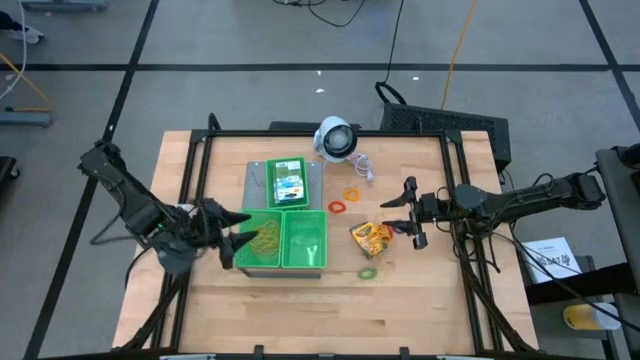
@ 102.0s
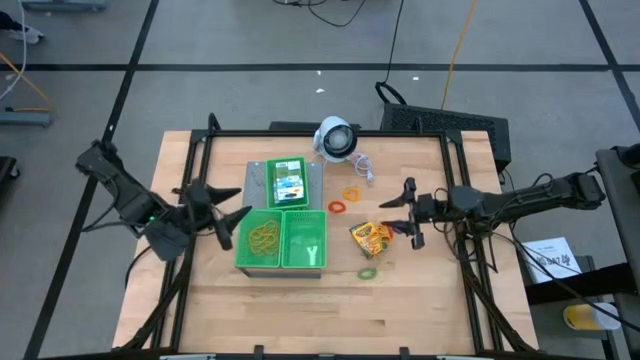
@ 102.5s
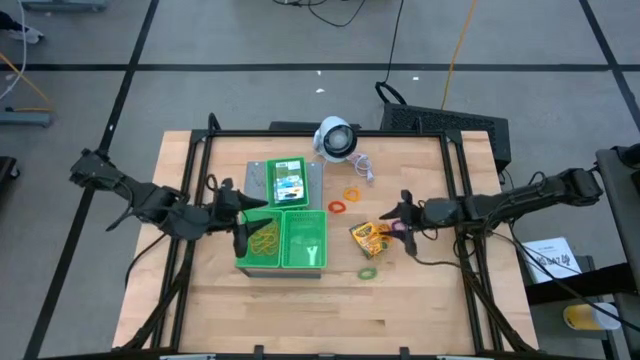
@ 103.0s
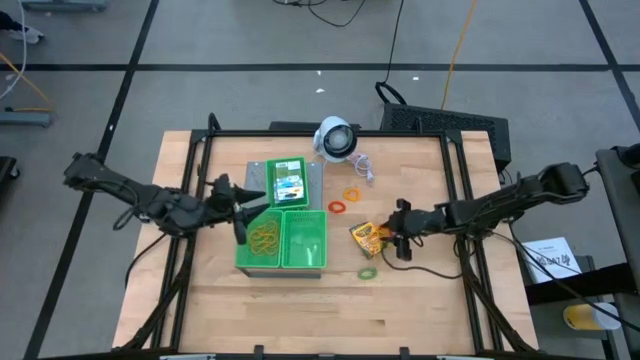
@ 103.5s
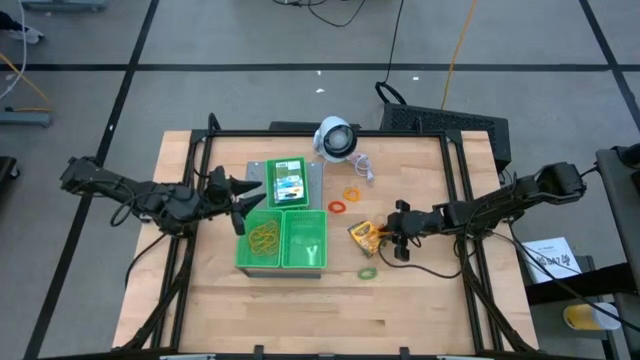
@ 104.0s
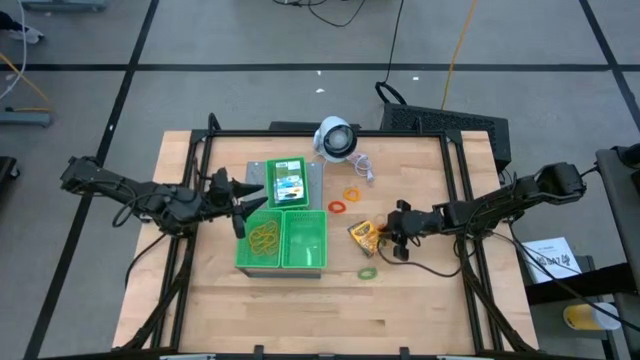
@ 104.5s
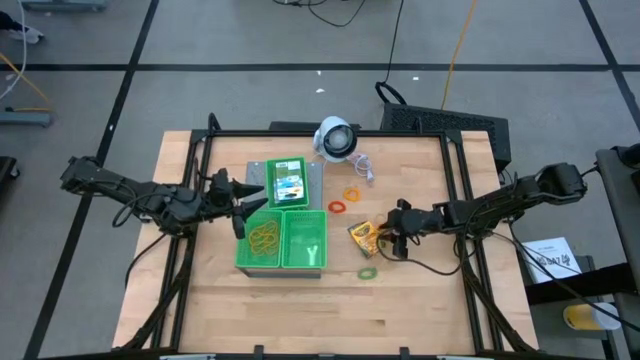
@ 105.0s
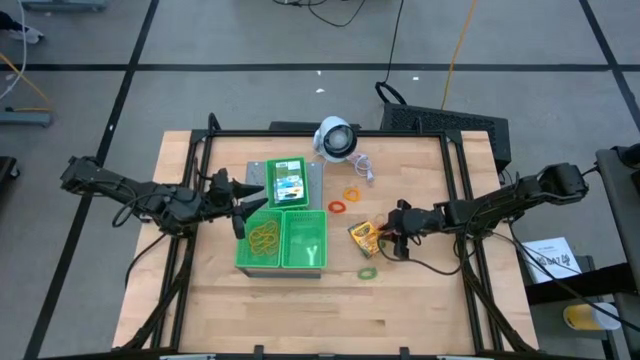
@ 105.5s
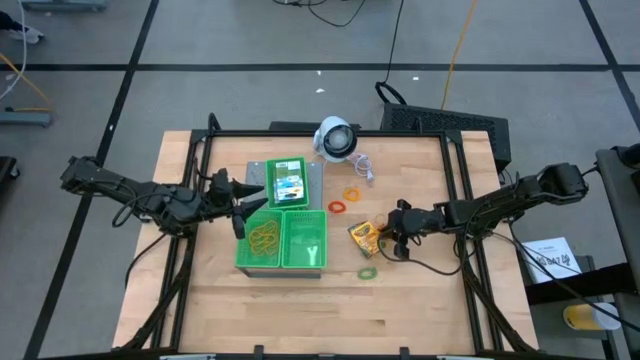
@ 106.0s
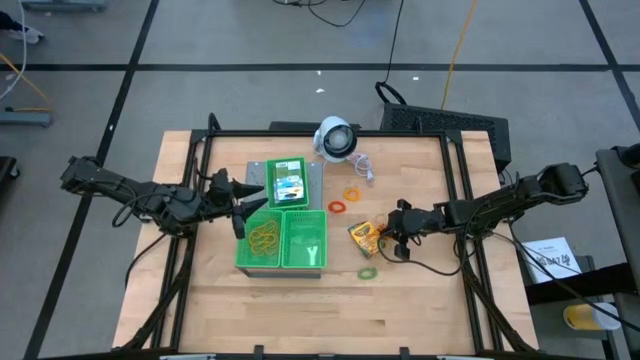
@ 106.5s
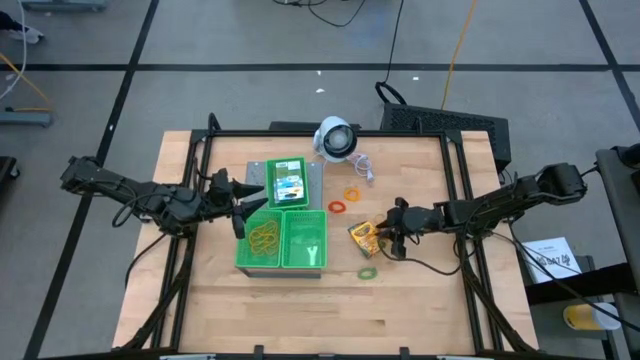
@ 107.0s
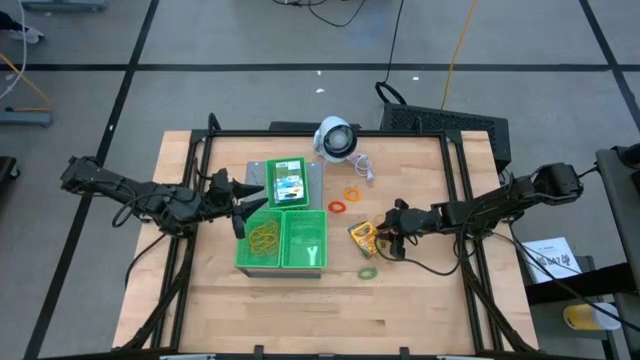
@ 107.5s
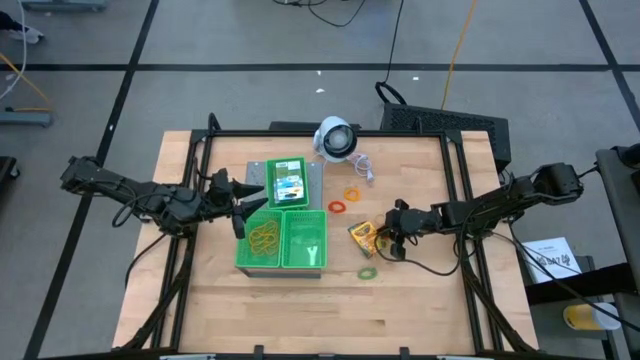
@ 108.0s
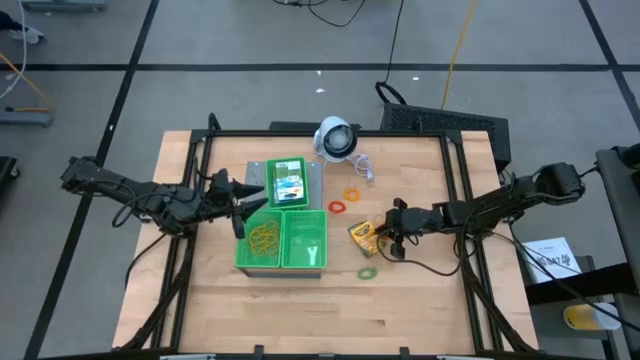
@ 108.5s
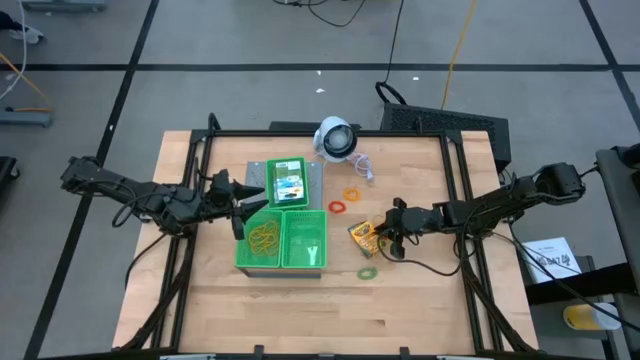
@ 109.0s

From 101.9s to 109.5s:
Task: Pick & Place Office Desk Supplies
Put the yellow rubber band into the bottom left green basket on the shelf

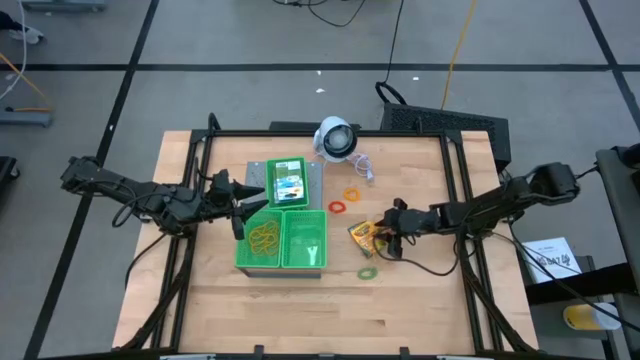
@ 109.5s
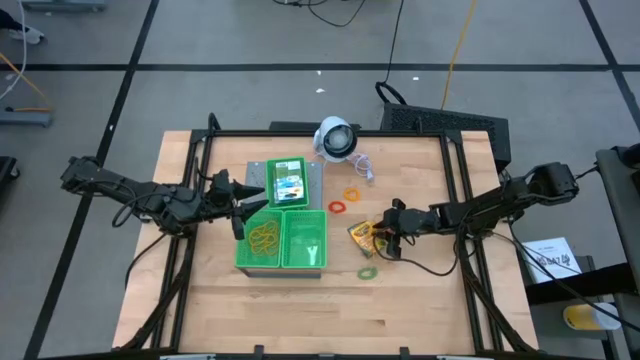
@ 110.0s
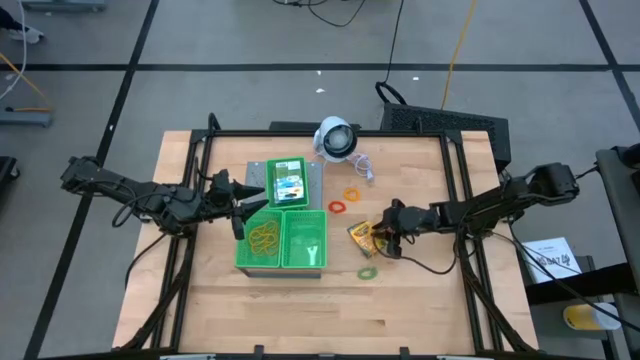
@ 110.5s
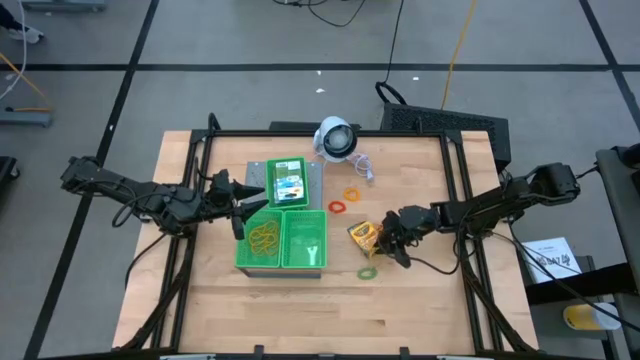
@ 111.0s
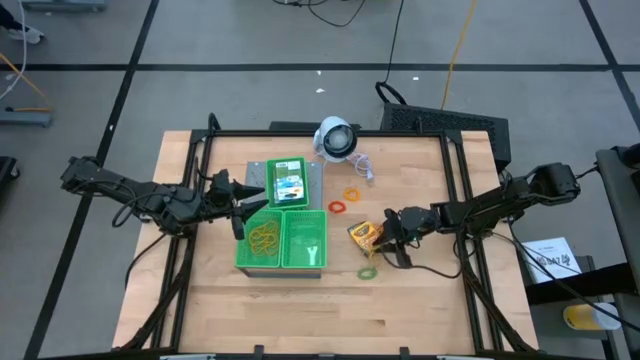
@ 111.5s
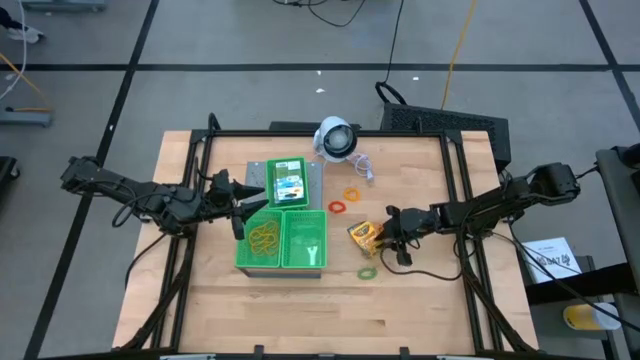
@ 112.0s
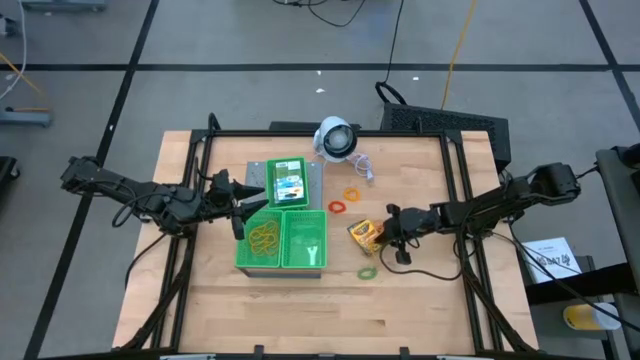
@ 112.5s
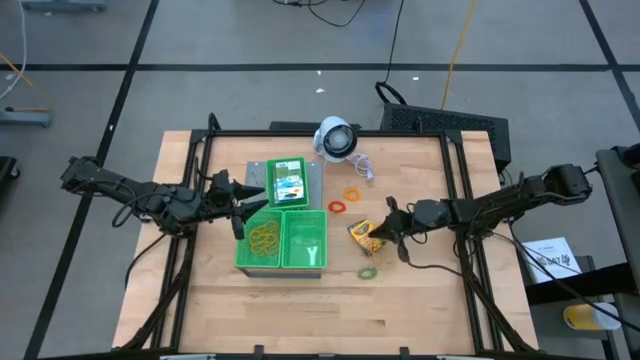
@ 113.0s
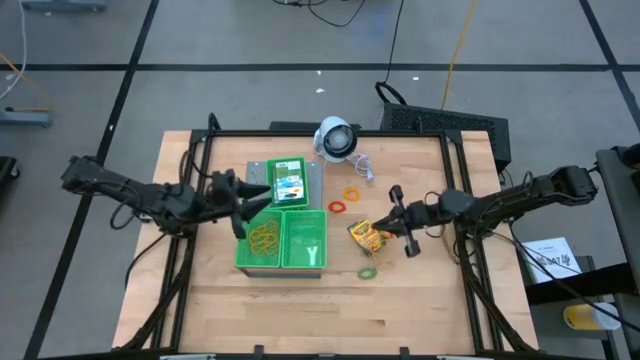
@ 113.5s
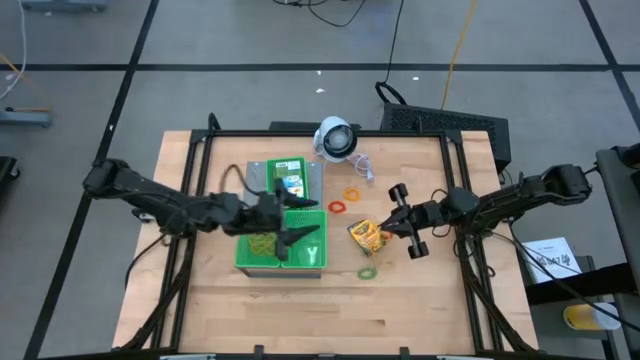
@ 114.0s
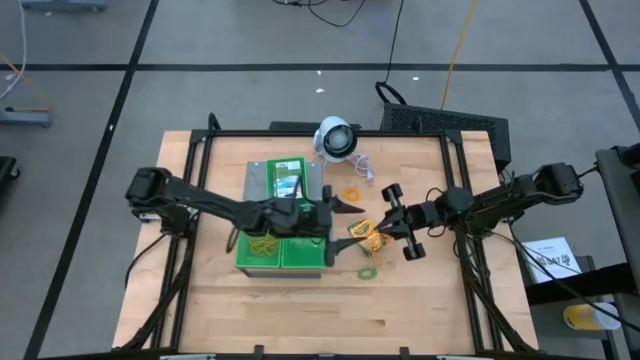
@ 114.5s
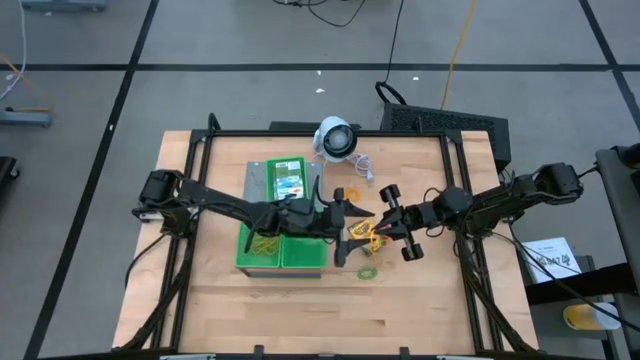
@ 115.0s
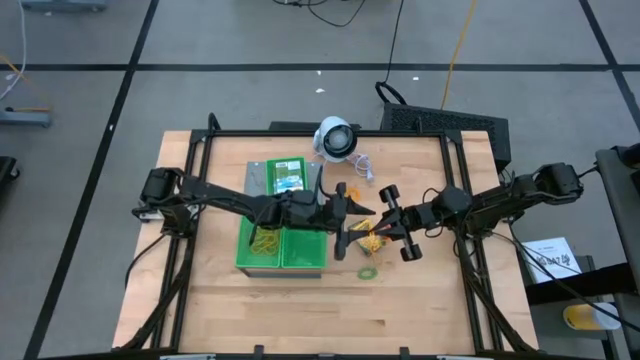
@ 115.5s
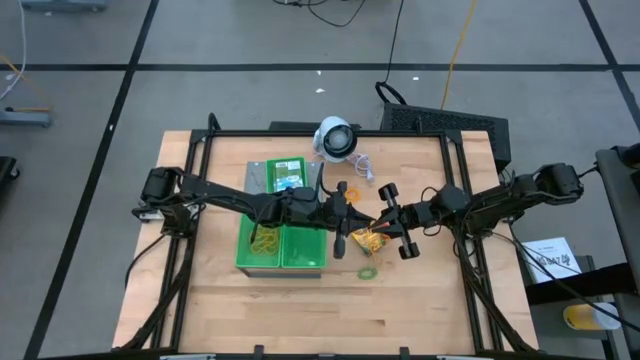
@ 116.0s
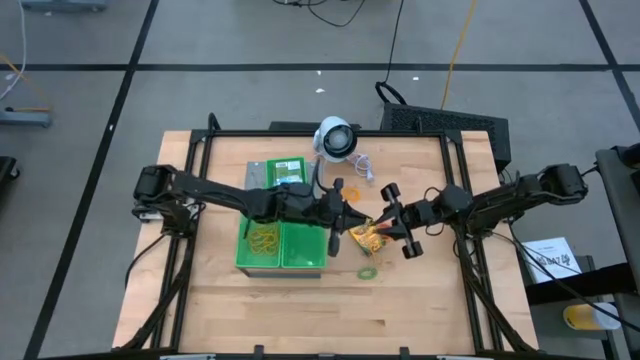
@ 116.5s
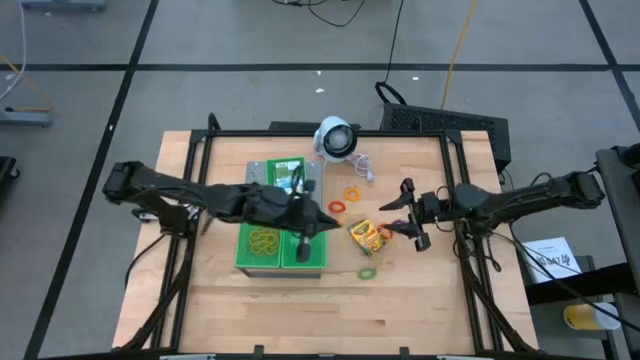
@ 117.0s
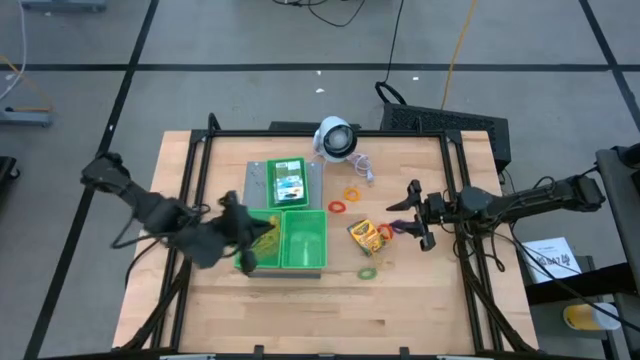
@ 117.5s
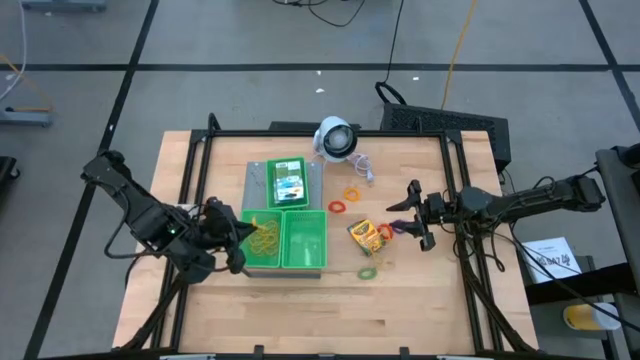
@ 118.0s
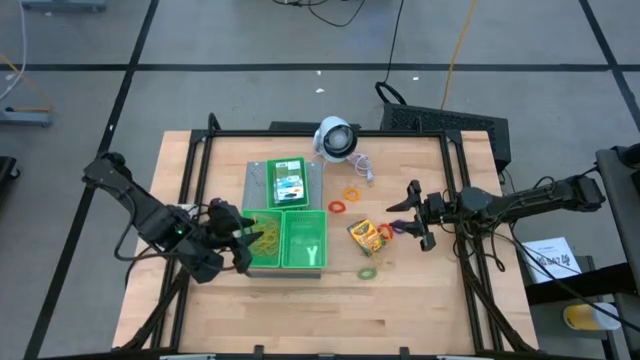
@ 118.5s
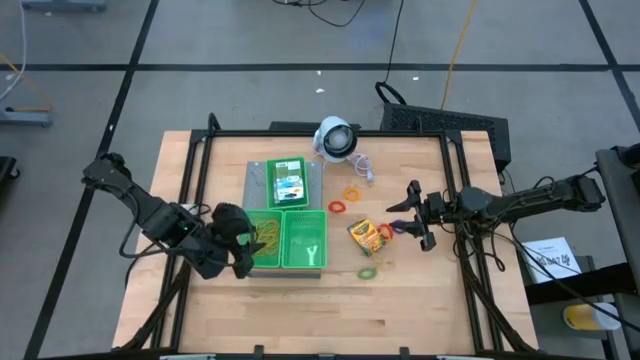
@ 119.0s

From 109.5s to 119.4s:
Put the yellow rubber band into the bottom left green basket on the shelf

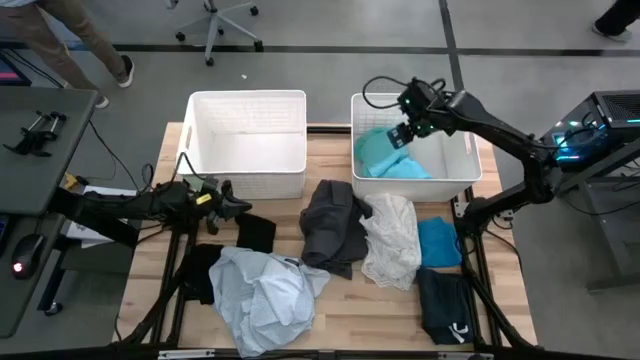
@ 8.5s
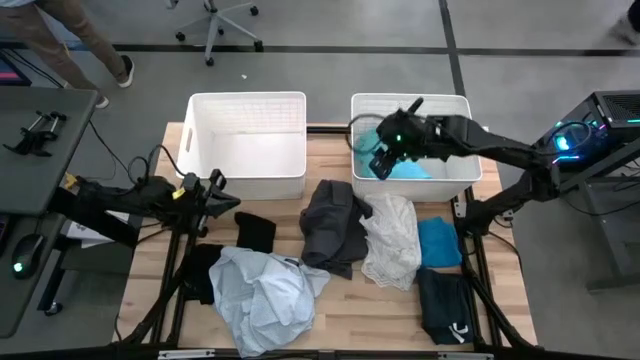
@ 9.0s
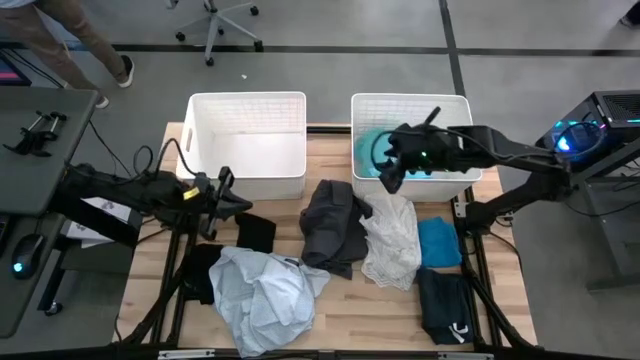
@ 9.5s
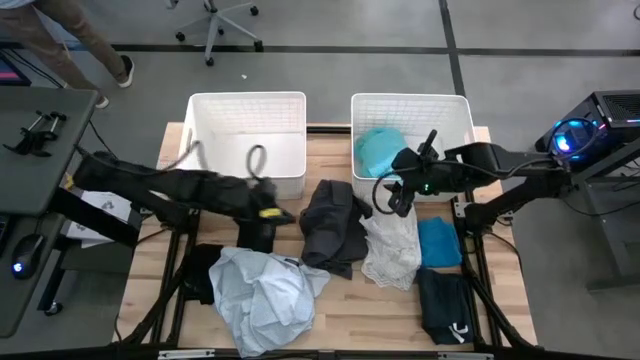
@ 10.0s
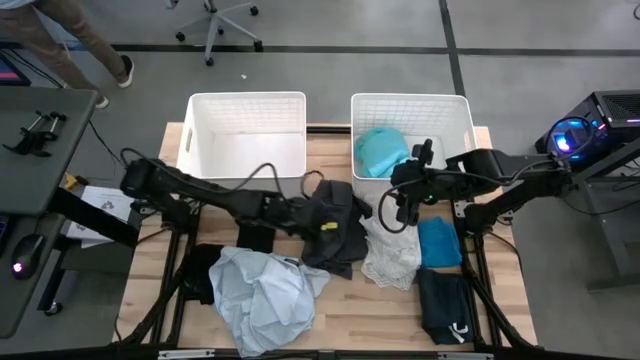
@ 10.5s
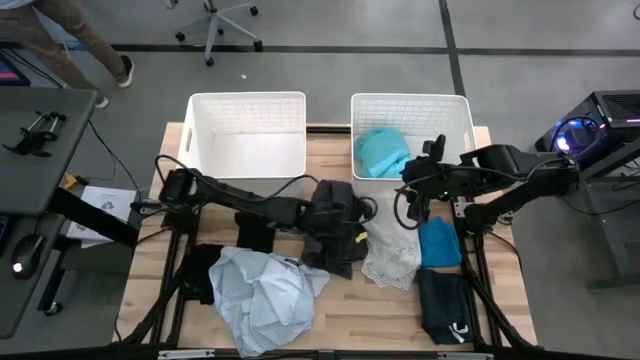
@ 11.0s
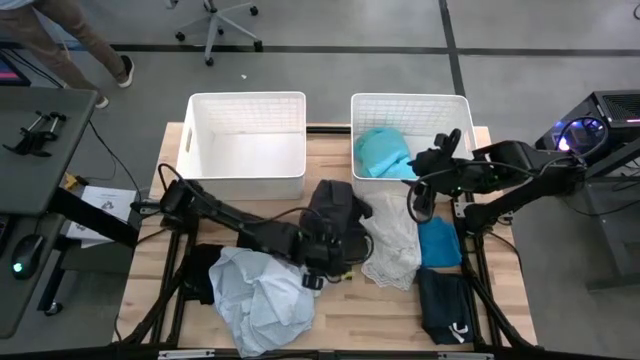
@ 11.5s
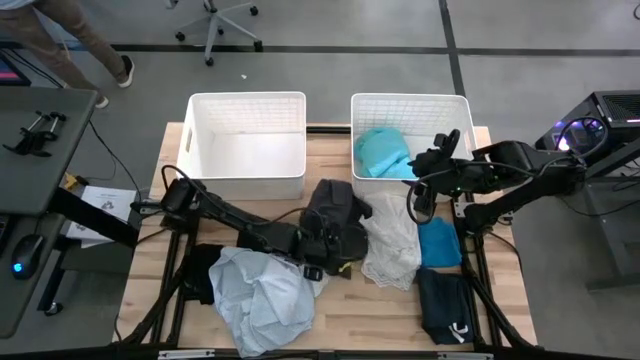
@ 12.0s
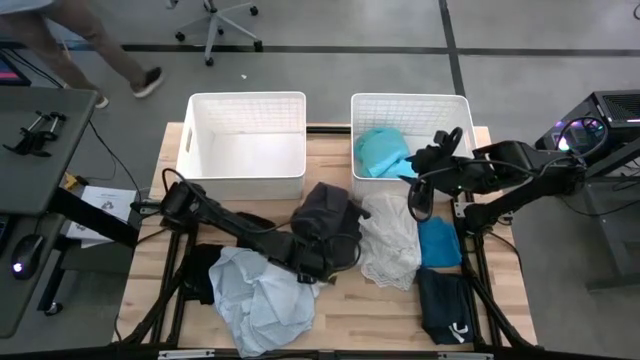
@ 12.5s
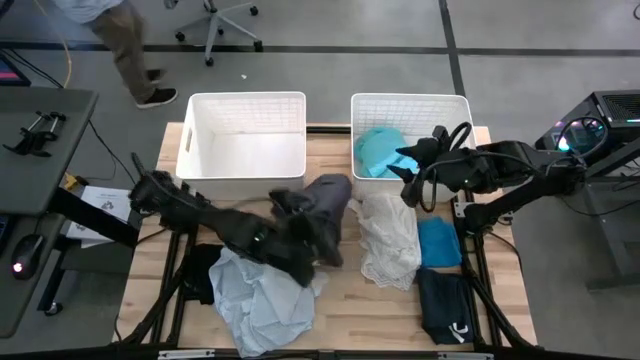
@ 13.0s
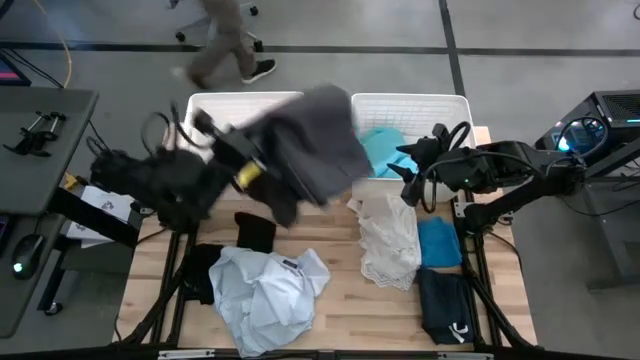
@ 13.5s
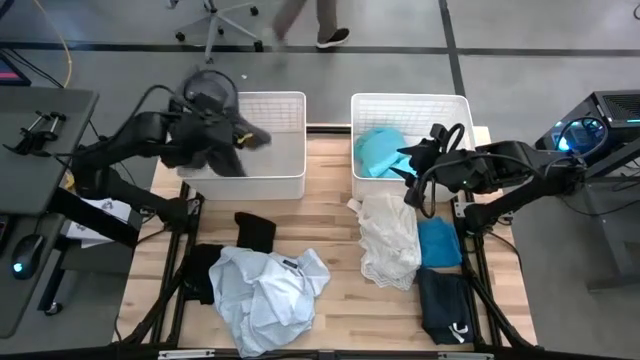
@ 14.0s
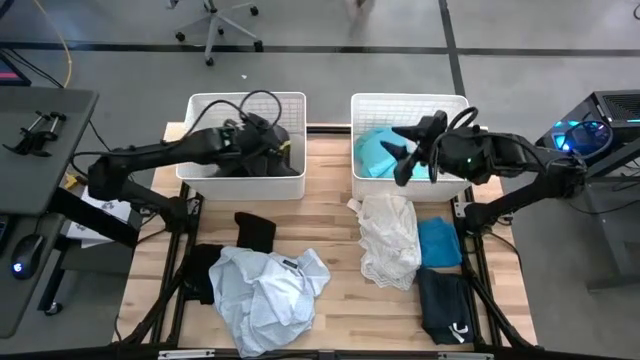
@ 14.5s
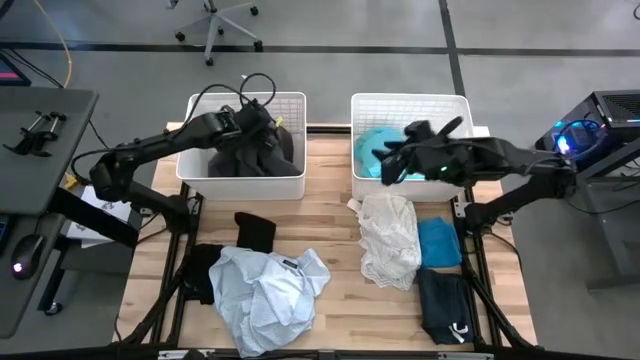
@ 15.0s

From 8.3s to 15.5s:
Task: Sort clothes
Put the gray shorts into the left white bin
